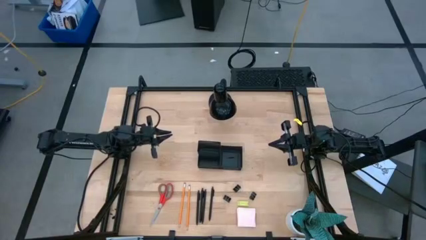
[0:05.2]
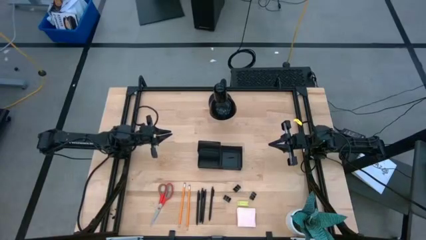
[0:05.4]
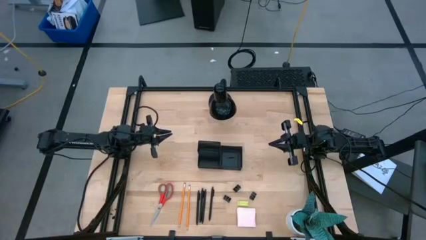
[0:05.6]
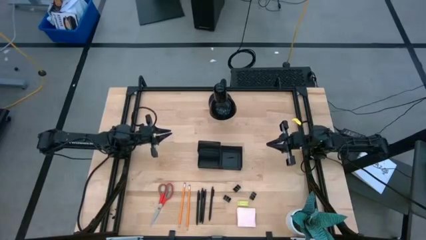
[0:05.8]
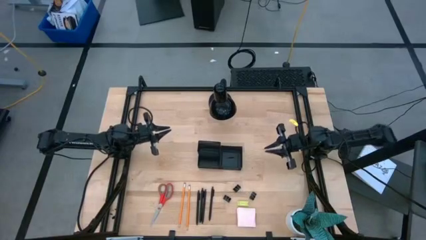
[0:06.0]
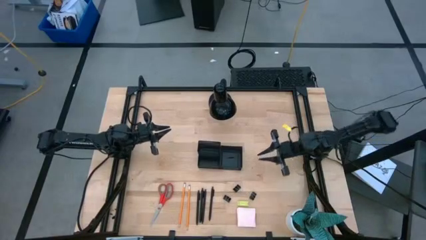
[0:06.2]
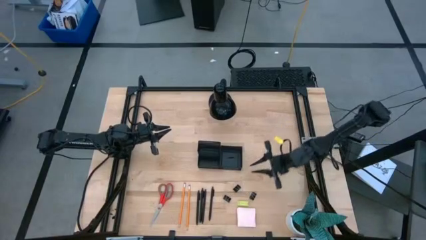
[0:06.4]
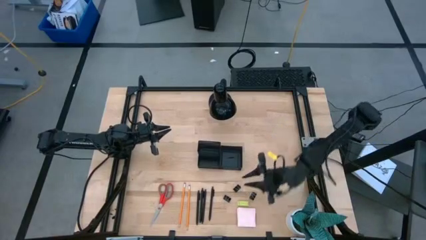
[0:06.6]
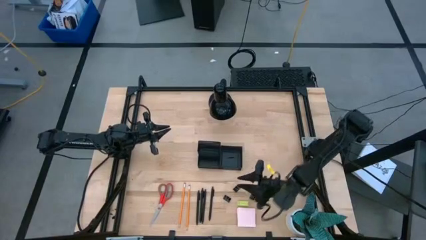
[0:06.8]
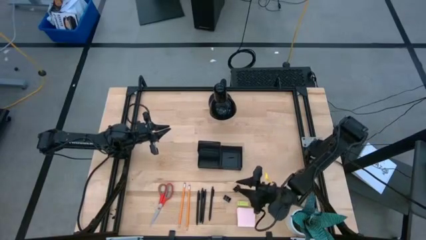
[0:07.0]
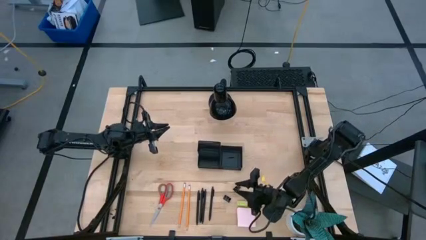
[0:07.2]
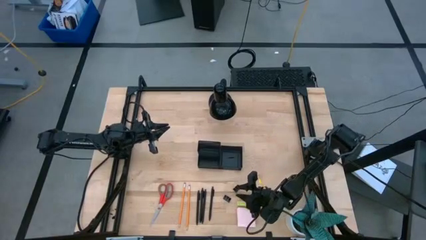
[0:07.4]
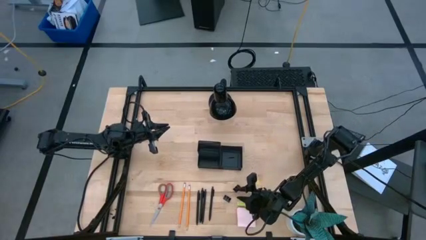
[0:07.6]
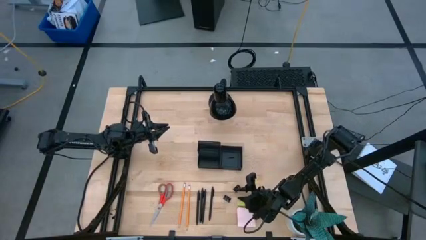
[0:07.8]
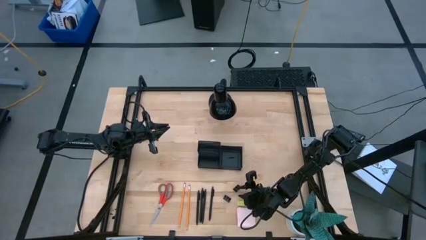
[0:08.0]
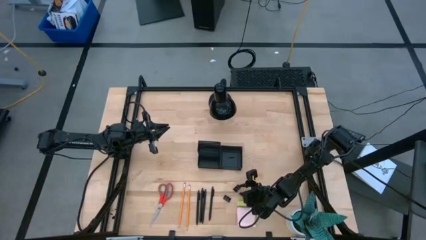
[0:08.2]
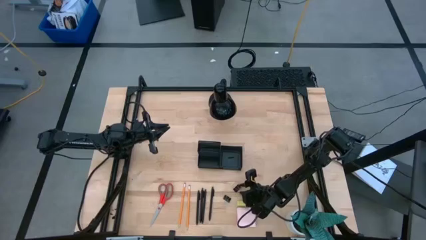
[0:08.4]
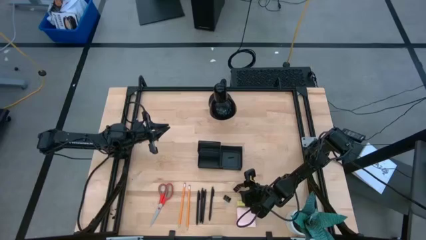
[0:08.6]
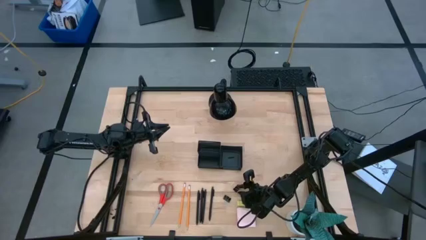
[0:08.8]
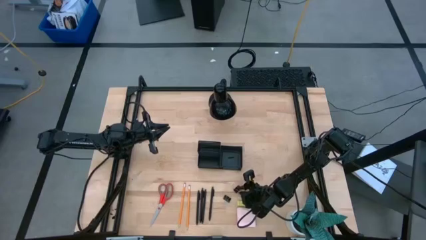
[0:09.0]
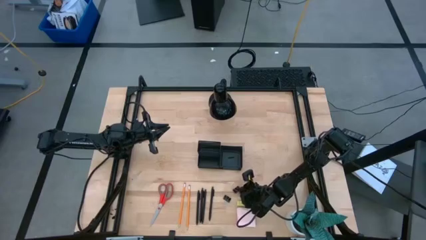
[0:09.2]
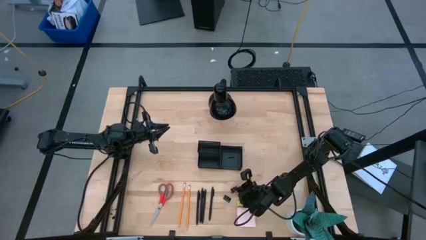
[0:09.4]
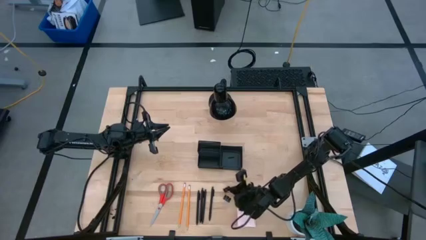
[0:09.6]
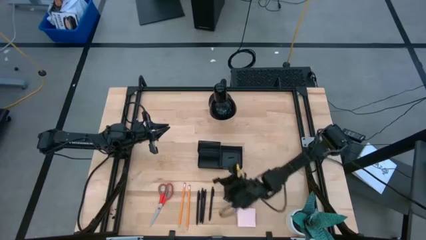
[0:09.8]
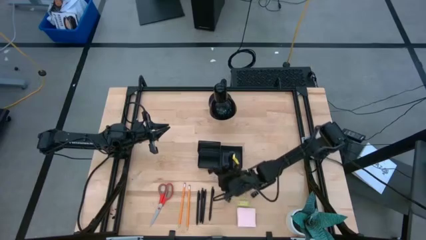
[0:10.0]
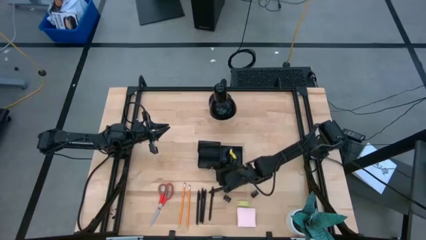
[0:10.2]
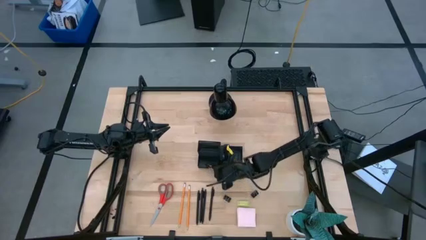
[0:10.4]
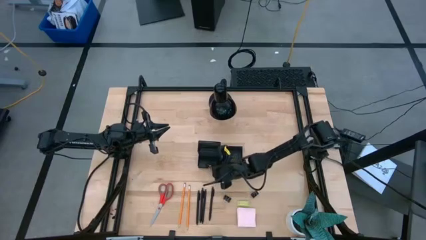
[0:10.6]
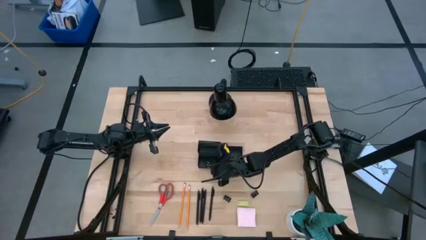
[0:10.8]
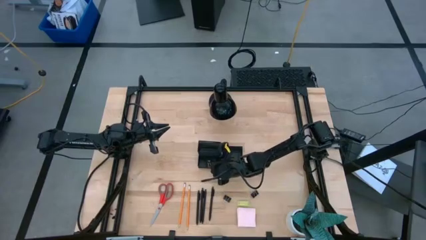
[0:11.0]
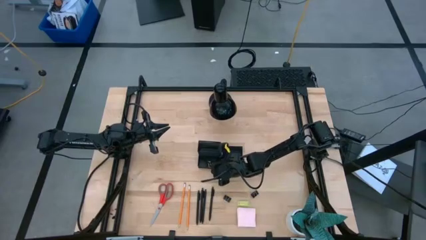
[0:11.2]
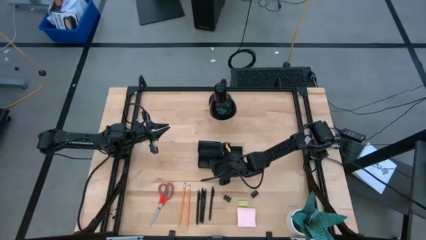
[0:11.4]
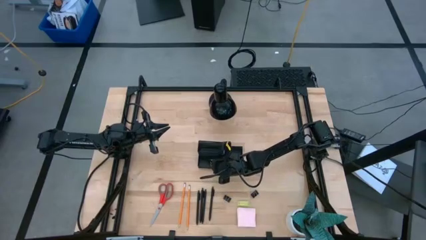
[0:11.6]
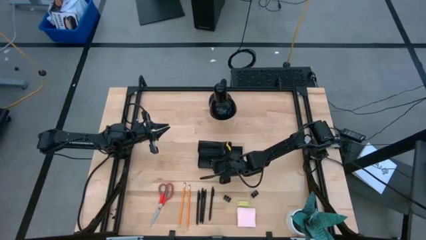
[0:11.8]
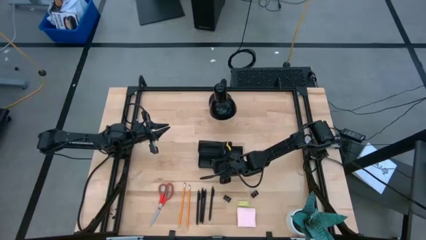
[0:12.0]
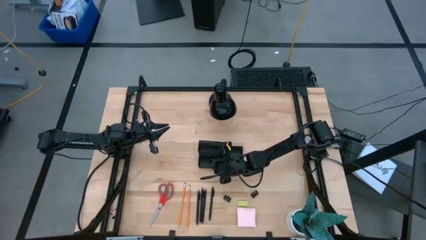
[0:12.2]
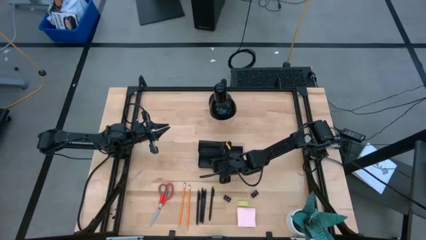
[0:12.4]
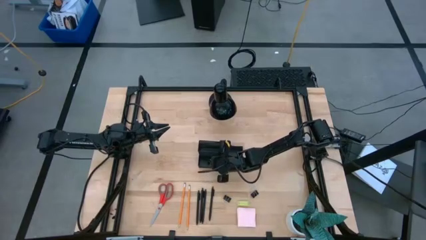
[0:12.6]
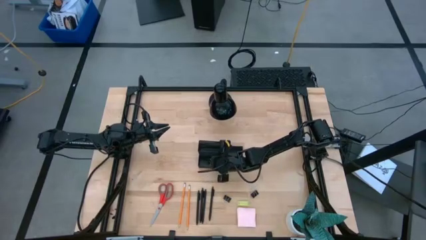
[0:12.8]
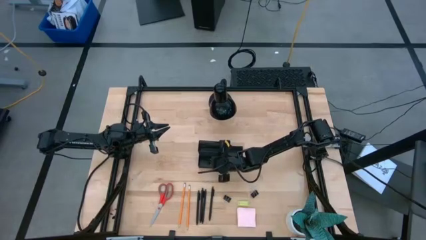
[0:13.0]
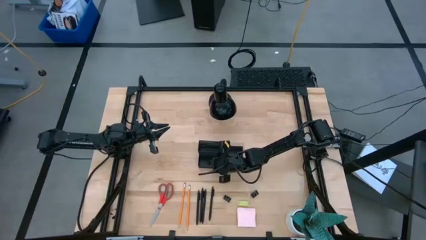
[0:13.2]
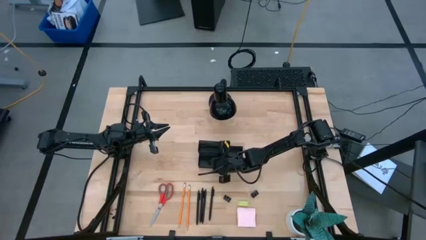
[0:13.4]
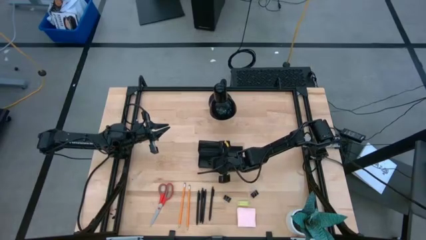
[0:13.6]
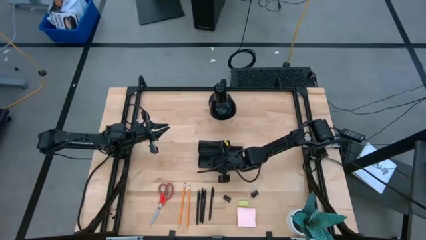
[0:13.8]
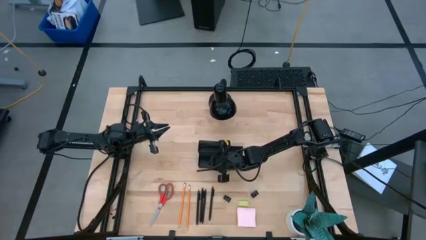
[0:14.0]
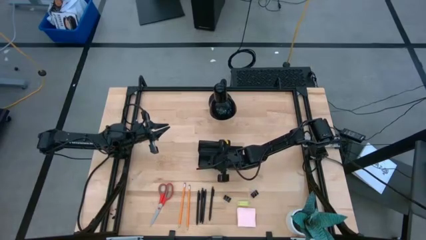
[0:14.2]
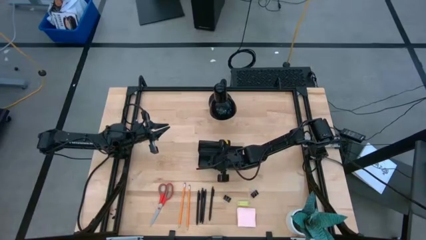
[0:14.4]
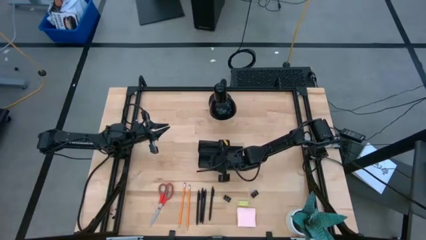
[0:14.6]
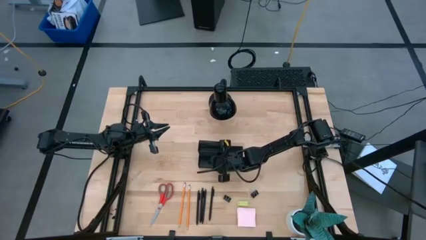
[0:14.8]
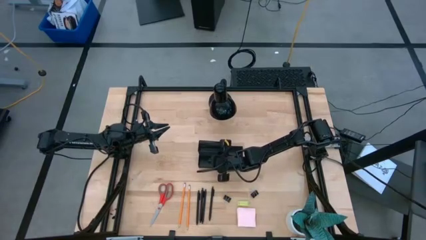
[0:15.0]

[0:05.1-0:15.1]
Task: Pick and place office supplies into organizer
Put the black binder clip into the black desk organizer

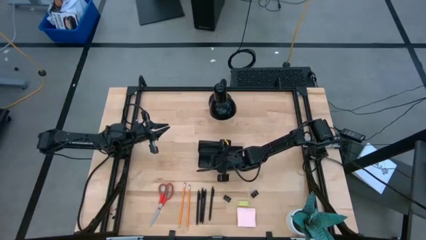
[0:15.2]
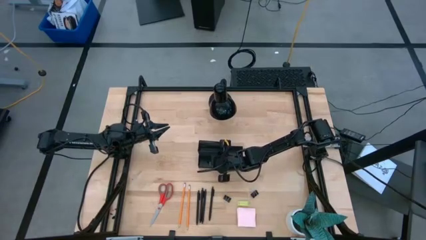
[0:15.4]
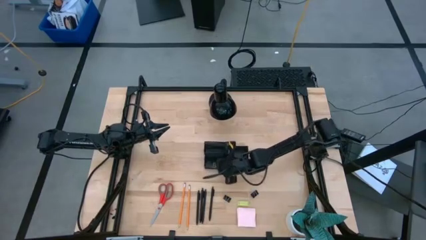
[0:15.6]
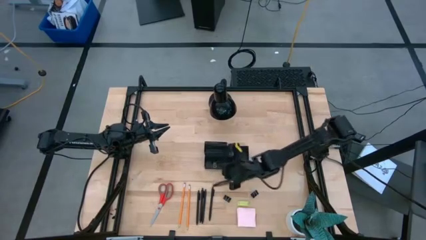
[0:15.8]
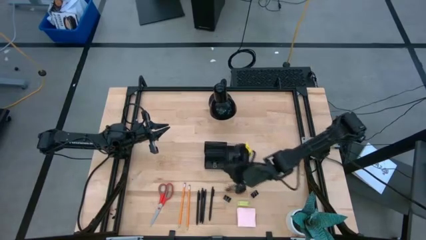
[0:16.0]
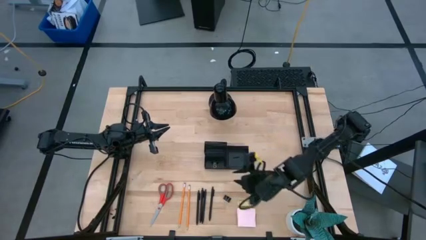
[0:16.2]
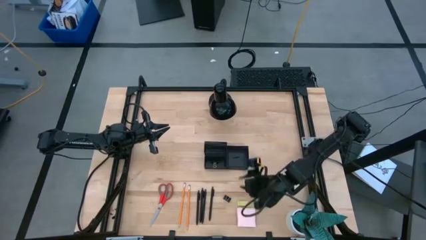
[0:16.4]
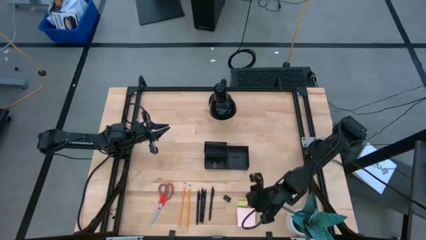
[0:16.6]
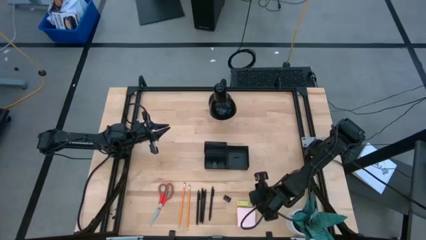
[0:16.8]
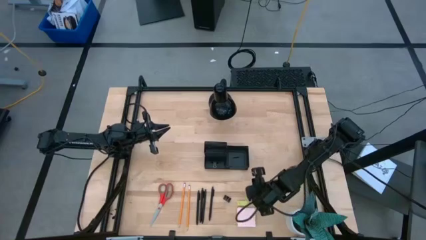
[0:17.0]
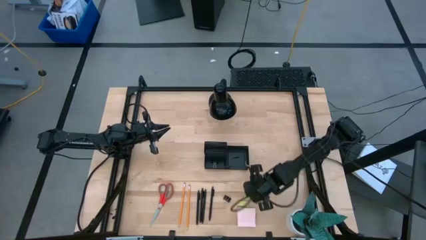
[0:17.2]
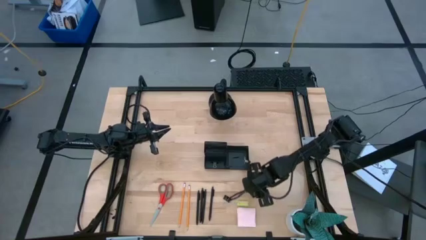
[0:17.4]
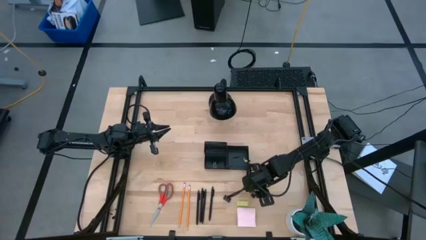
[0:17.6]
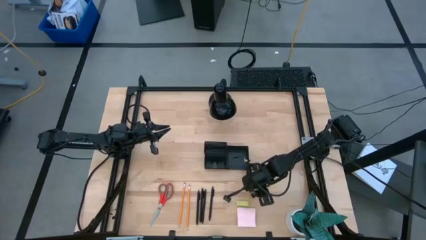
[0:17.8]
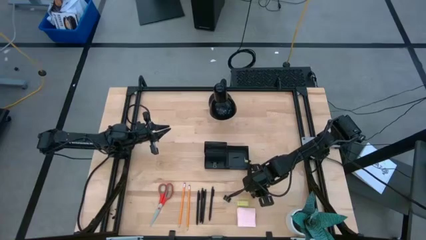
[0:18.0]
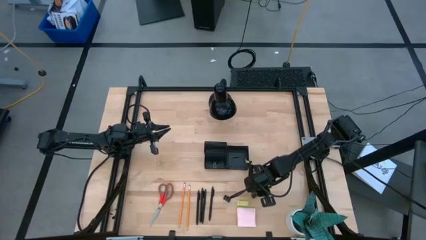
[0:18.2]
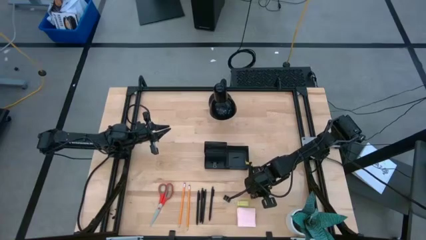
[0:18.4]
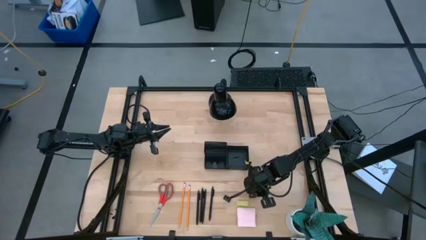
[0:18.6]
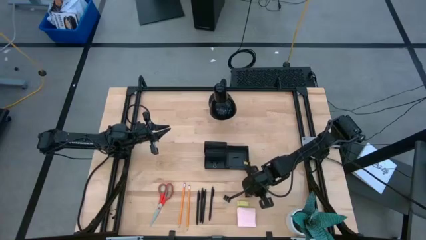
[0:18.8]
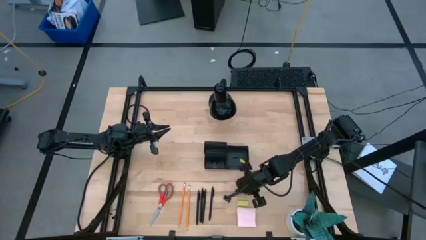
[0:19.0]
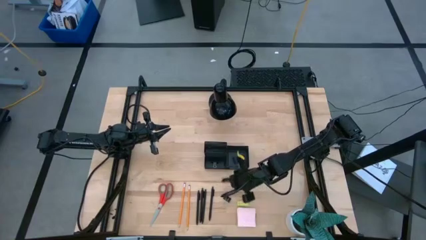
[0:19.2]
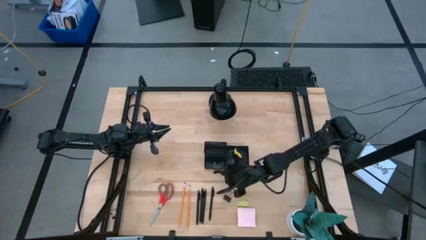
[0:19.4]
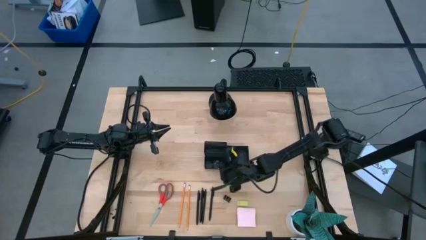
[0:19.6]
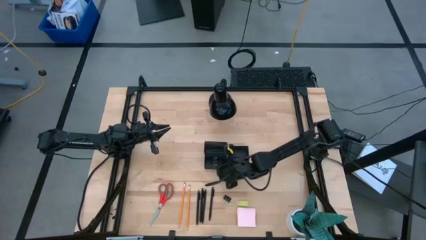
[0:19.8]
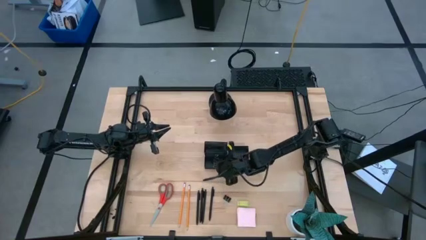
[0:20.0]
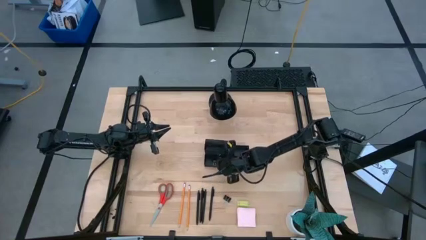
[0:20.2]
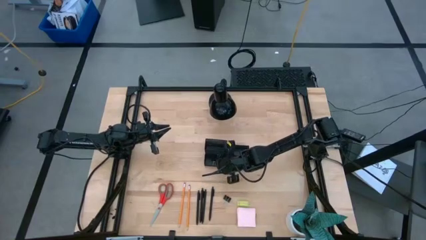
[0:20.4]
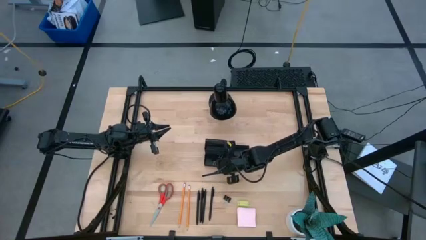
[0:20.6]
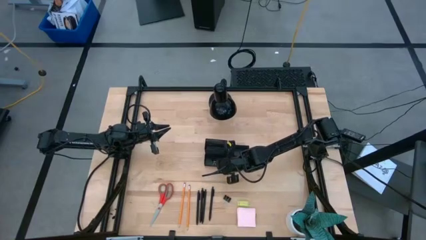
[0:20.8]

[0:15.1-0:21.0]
Put the black binder clip into the black desk organizer
